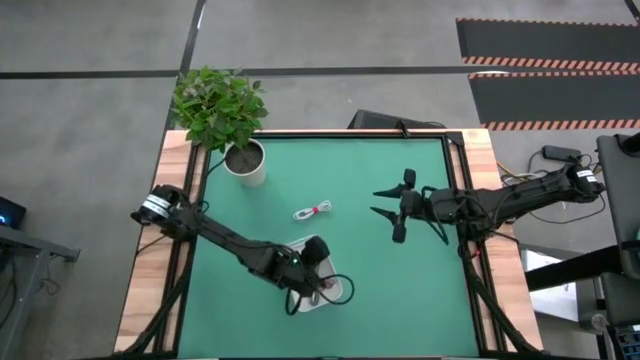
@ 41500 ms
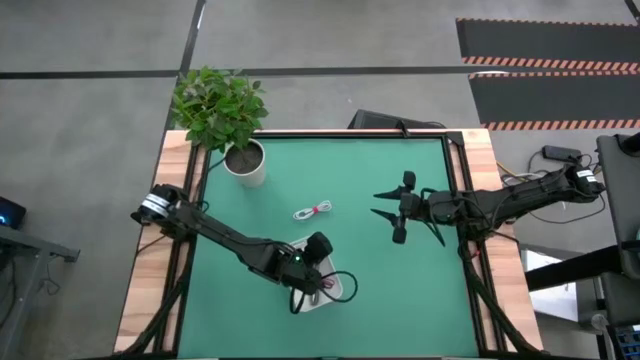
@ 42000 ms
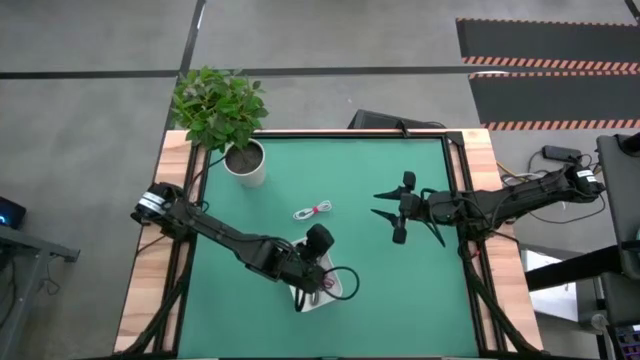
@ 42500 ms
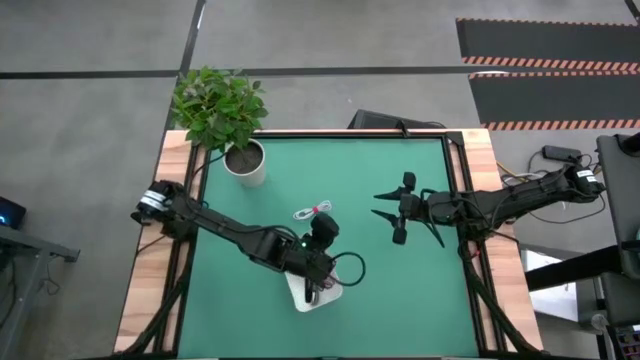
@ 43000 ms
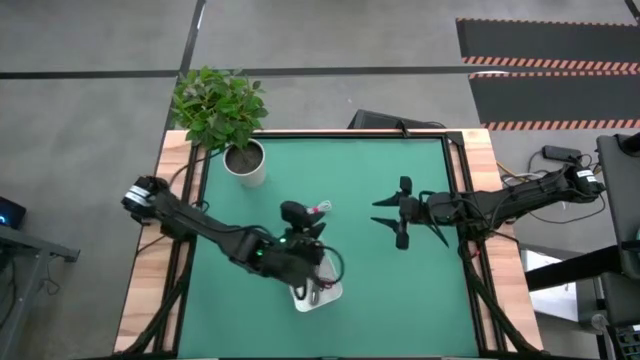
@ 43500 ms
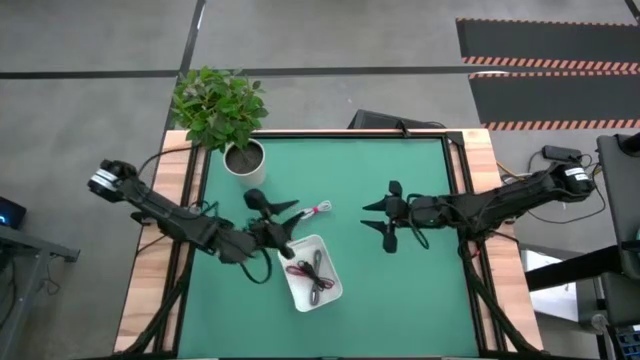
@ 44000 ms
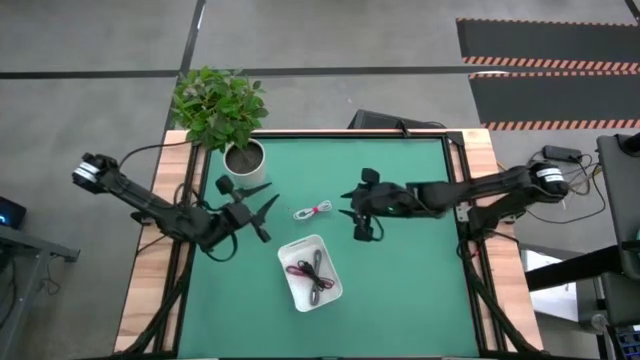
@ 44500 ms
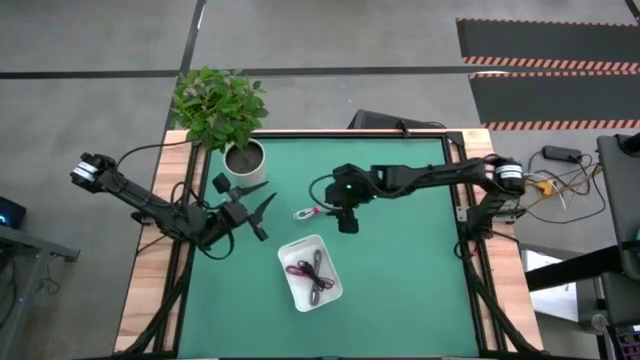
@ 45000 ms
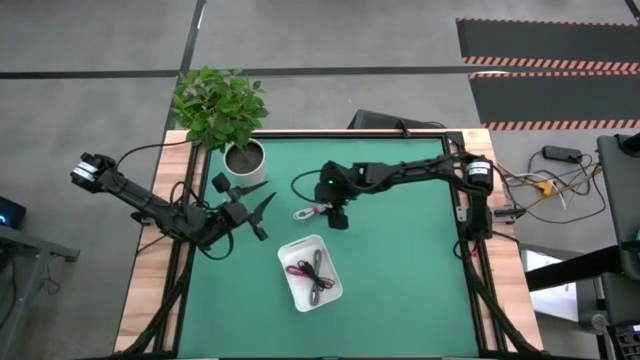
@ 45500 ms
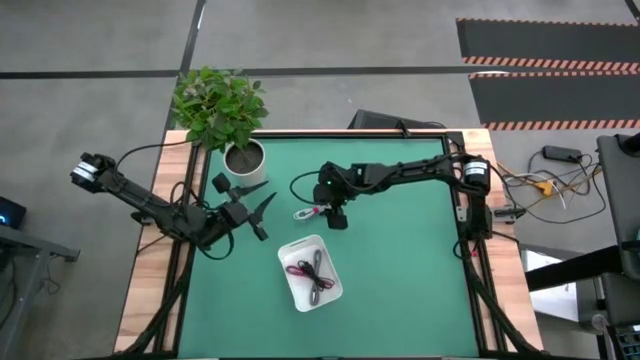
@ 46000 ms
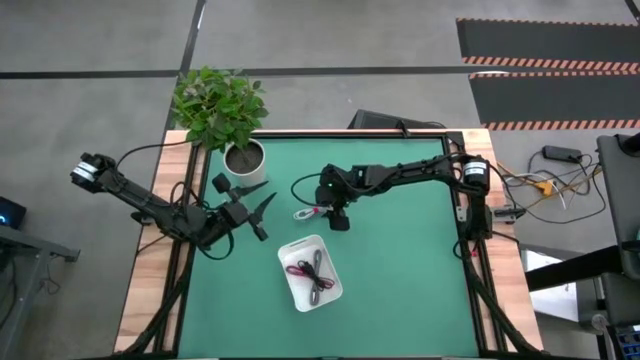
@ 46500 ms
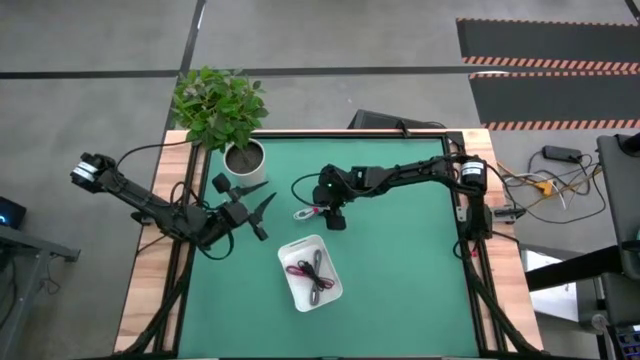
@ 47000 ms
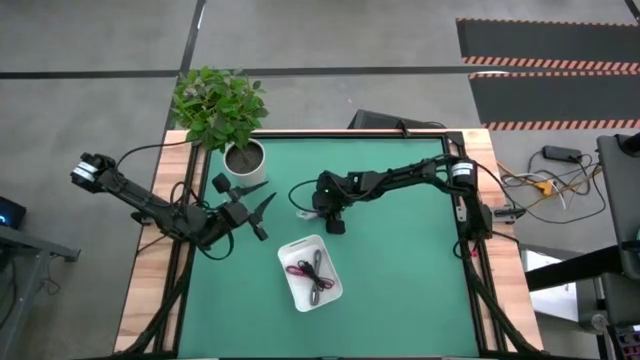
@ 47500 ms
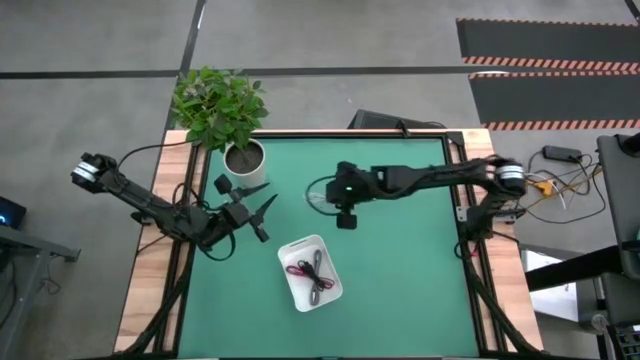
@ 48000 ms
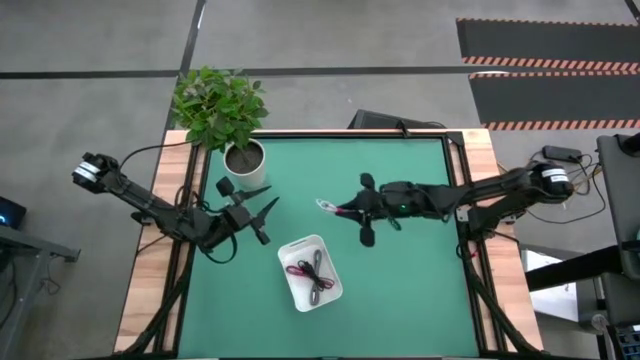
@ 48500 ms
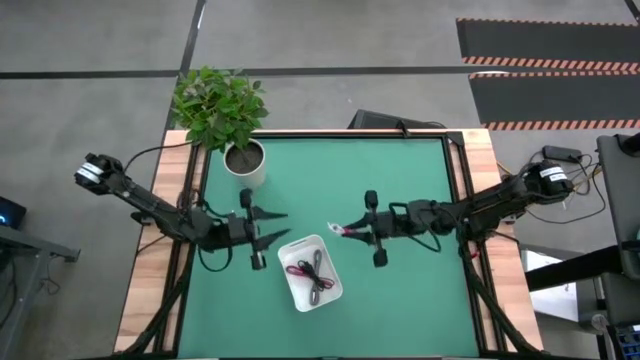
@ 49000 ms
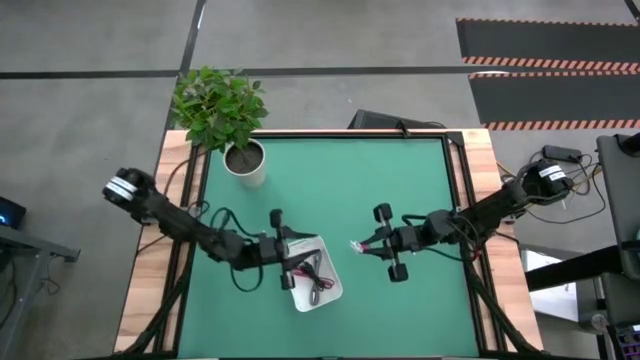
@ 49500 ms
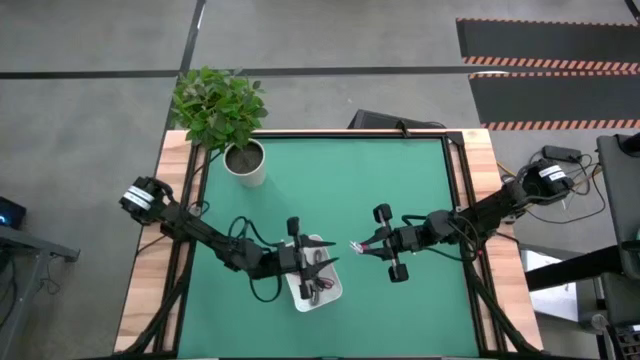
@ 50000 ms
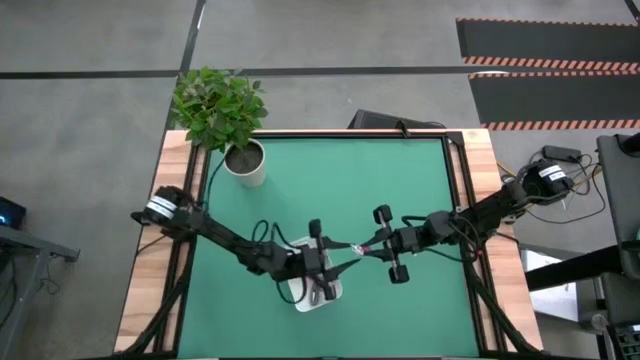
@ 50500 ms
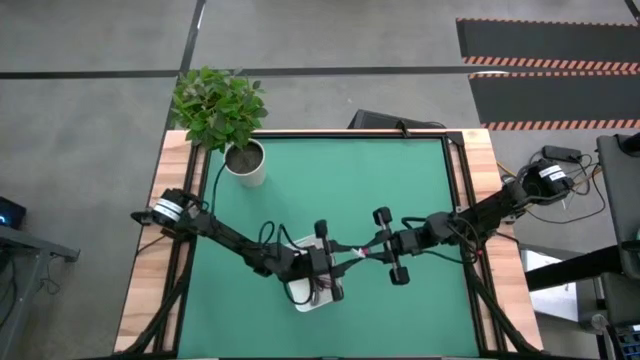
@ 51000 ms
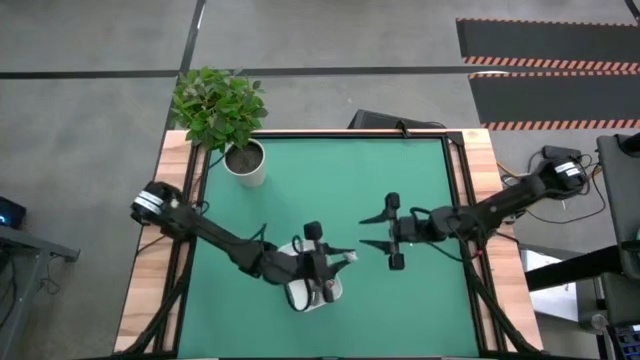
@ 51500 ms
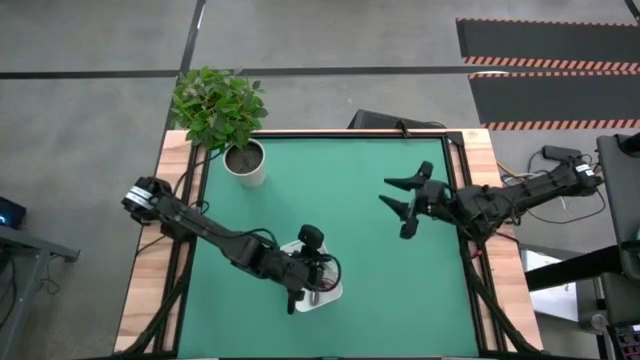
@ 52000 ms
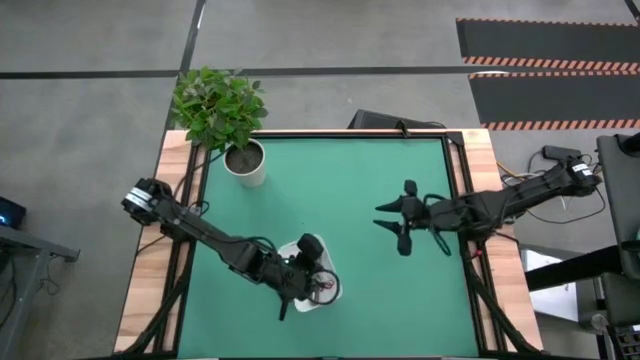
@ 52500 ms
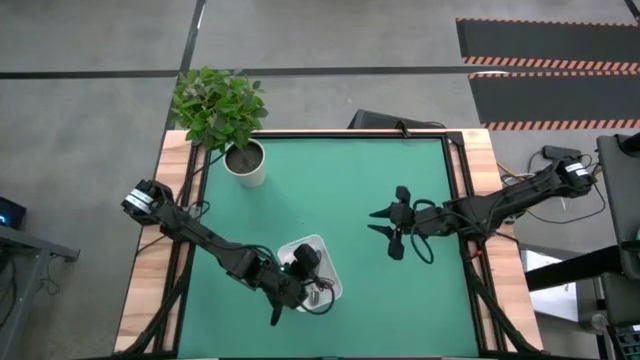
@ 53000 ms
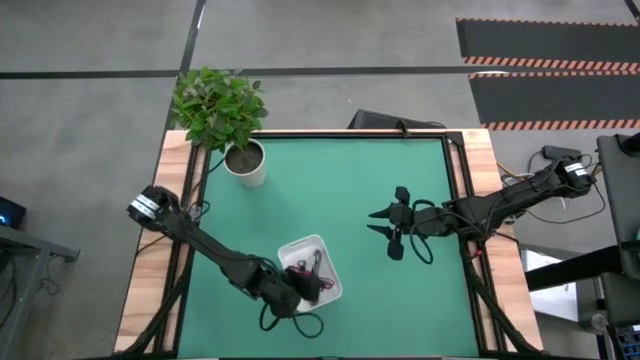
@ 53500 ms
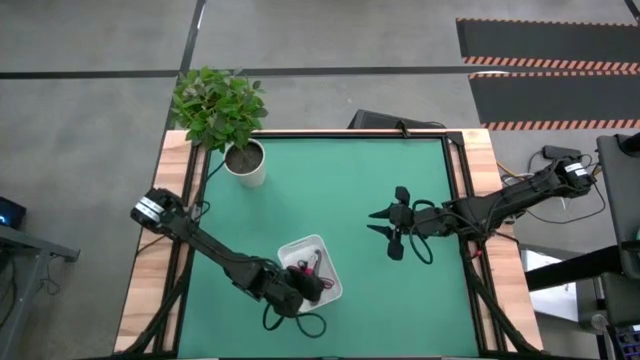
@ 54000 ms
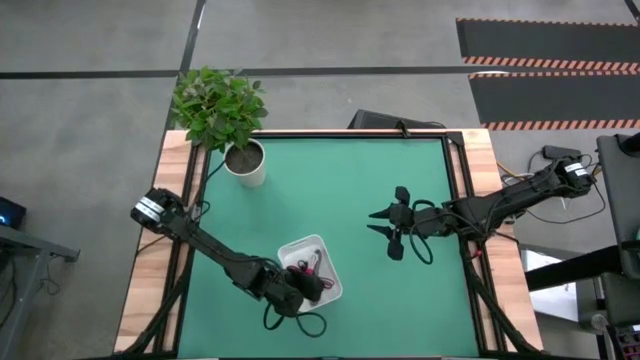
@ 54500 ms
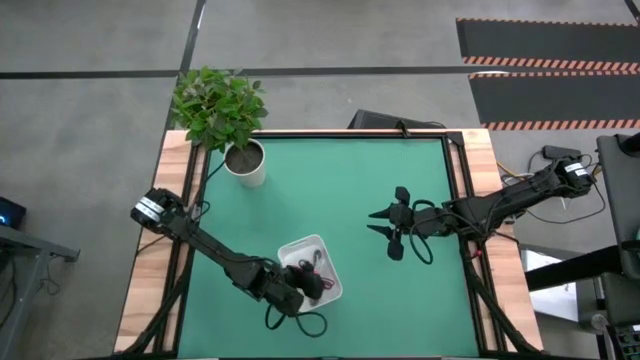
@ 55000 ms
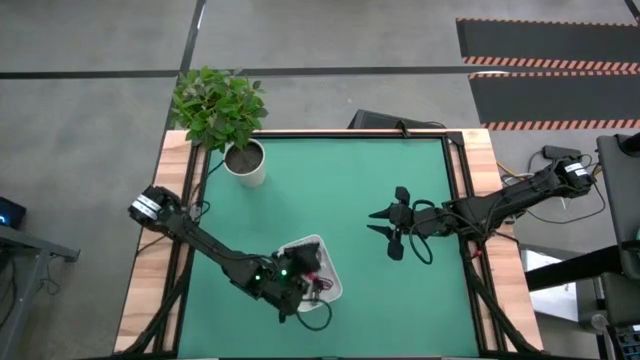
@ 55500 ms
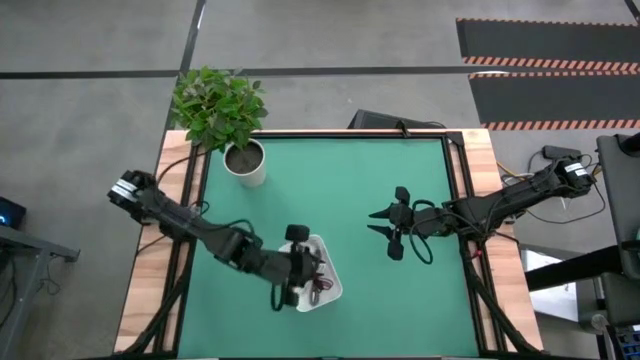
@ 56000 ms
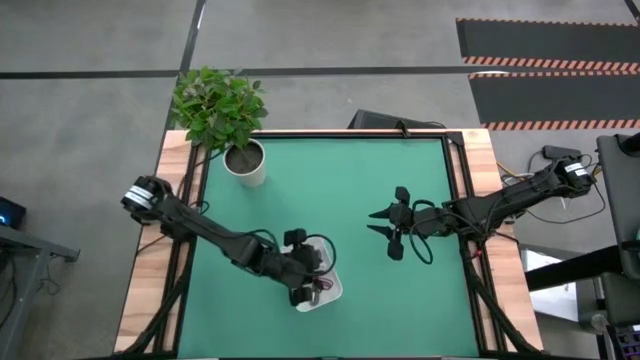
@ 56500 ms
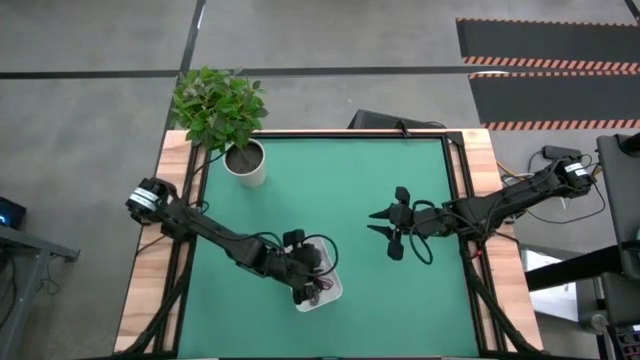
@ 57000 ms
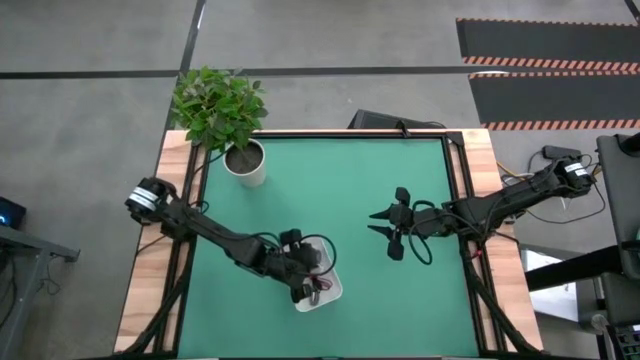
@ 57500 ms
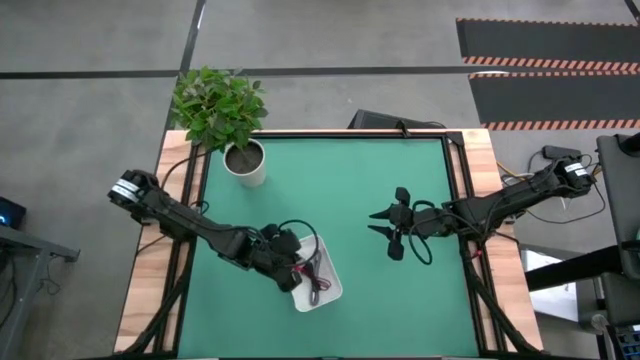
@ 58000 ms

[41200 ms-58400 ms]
Task: Pick and place USB-C Cables
Put the white charger cable into the white bin

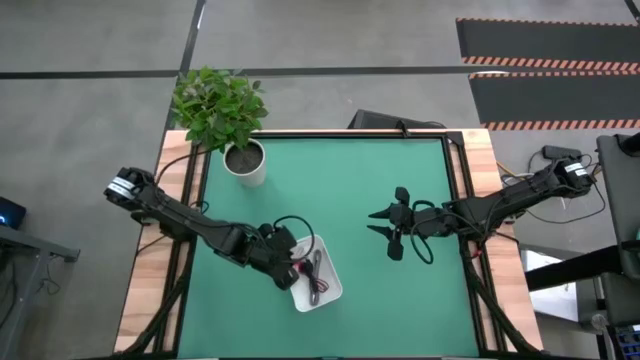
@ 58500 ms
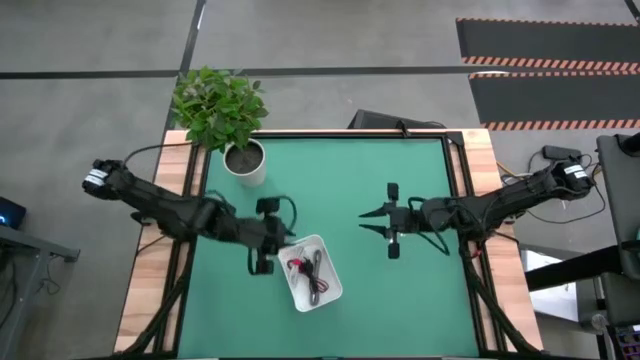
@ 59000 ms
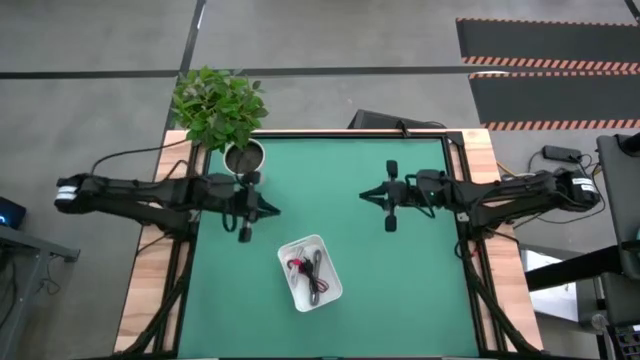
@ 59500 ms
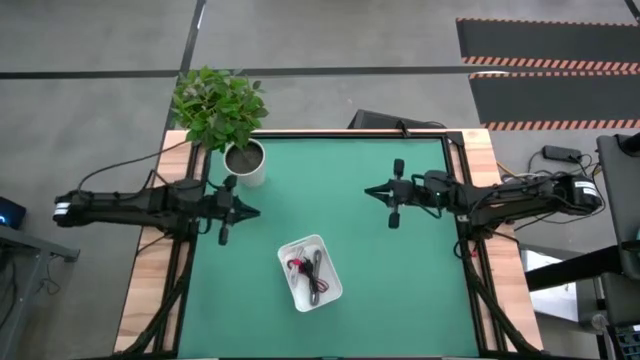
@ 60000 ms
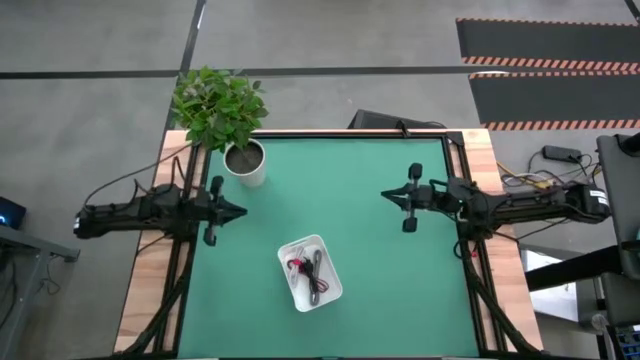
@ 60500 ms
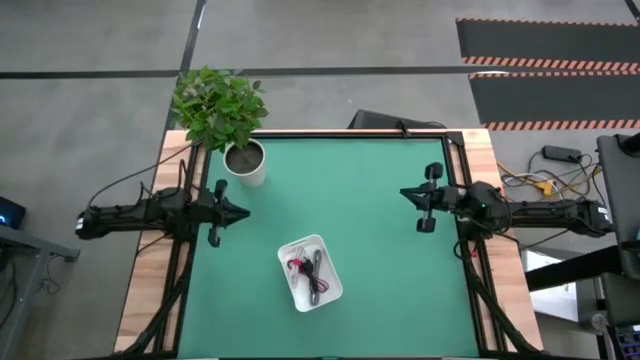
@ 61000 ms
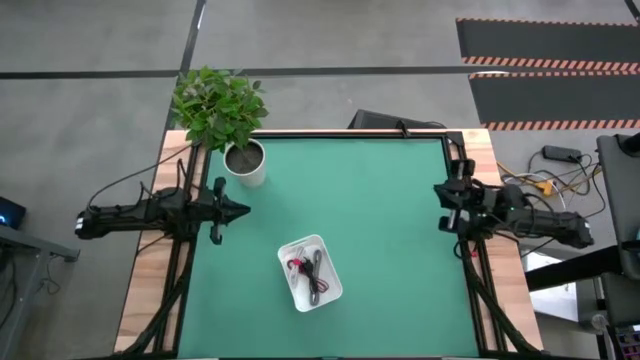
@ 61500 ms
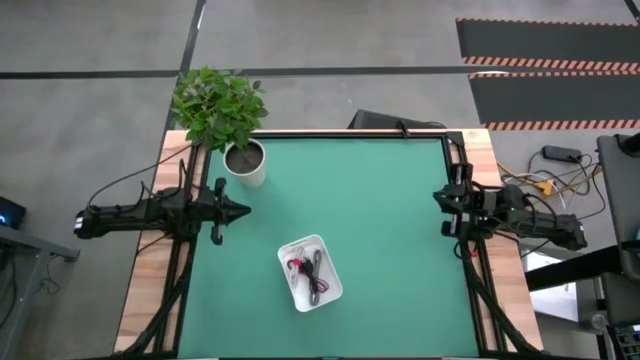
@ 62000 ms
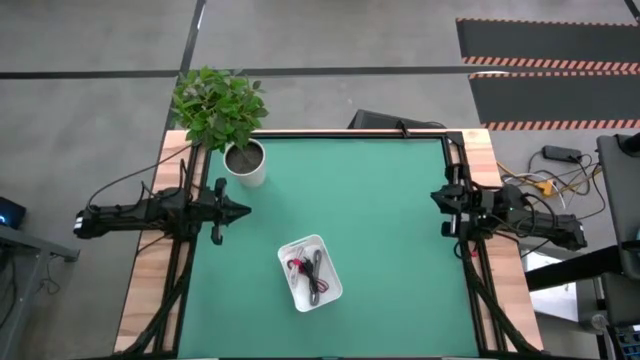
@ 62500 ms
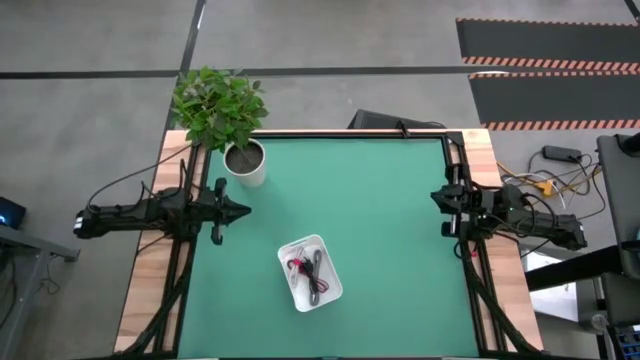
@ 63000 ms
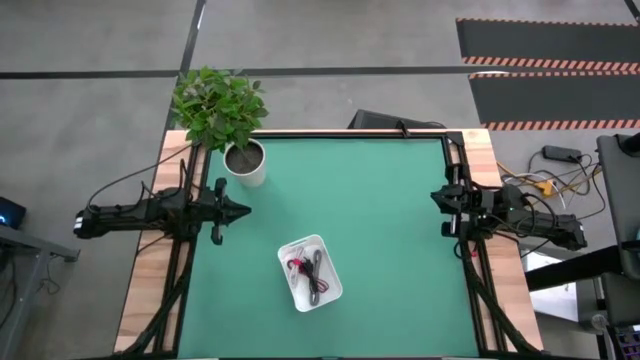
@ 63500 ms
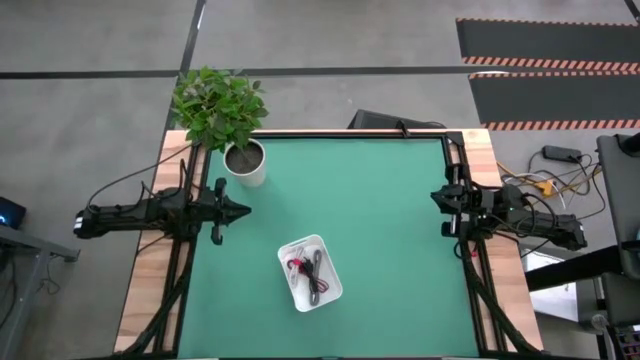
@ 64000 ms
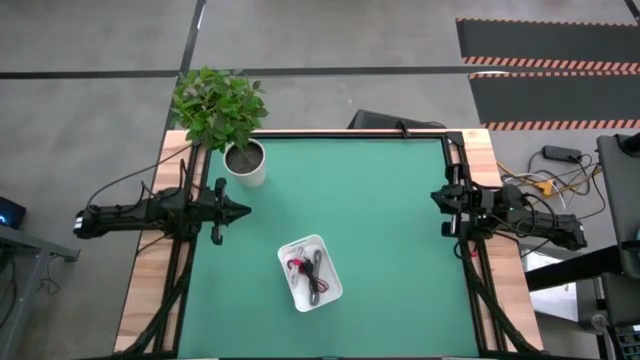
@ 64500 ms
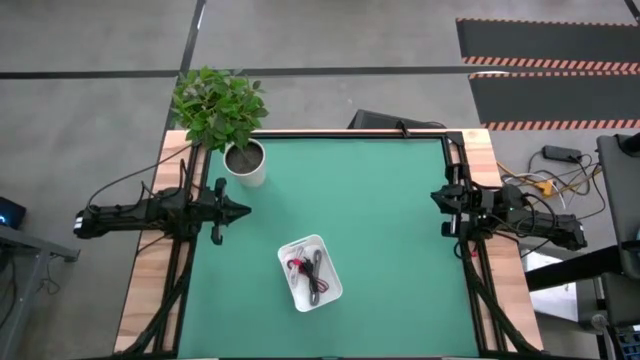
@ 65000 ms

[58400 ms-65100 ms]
Return to Home Position
